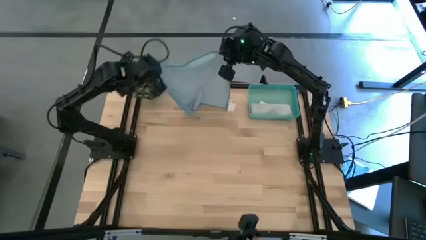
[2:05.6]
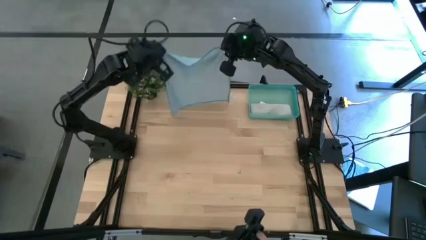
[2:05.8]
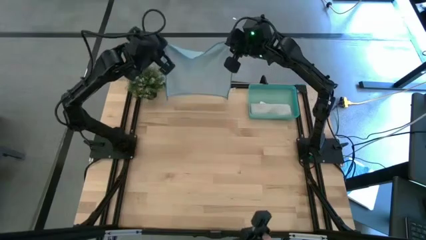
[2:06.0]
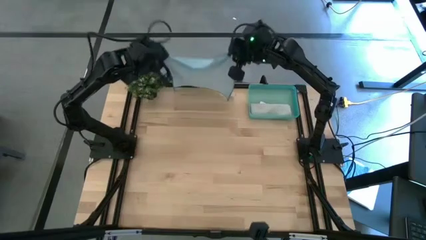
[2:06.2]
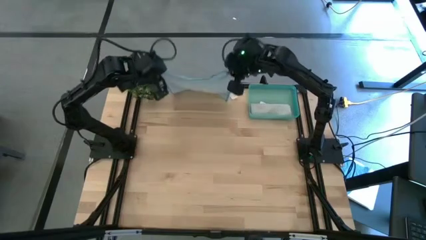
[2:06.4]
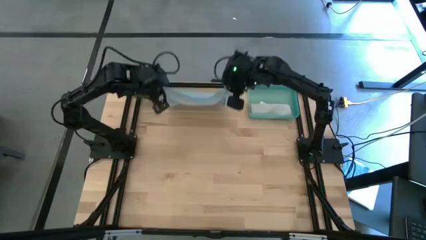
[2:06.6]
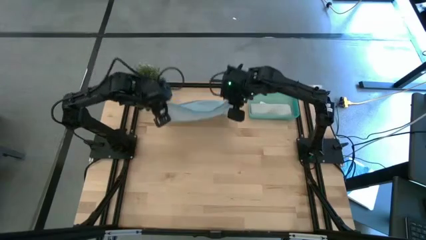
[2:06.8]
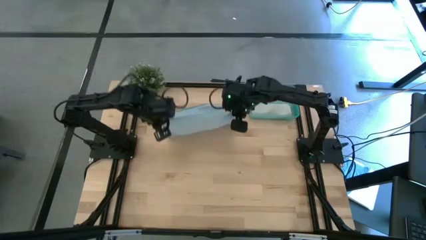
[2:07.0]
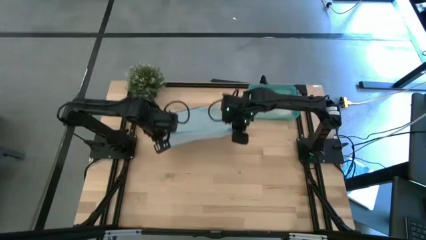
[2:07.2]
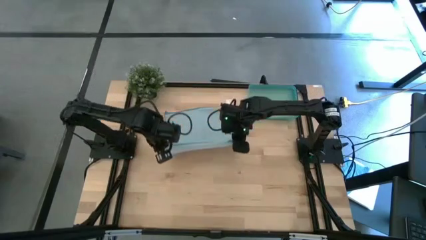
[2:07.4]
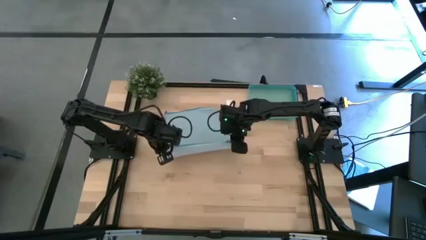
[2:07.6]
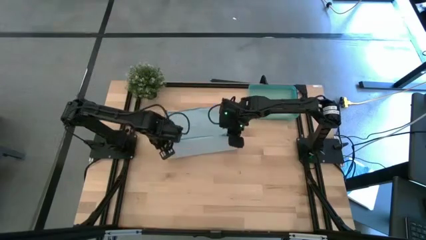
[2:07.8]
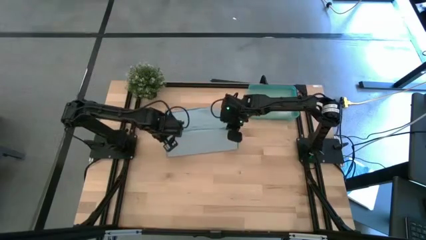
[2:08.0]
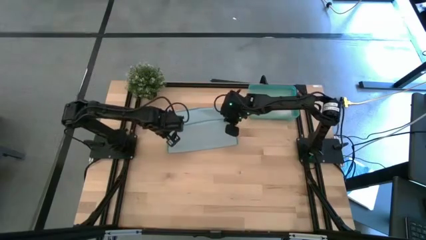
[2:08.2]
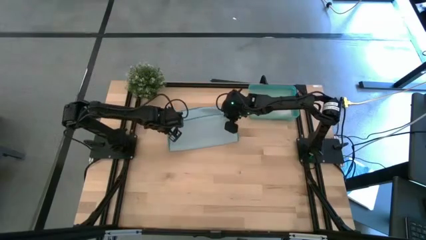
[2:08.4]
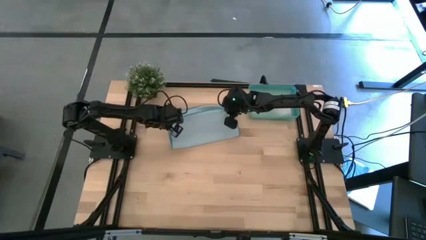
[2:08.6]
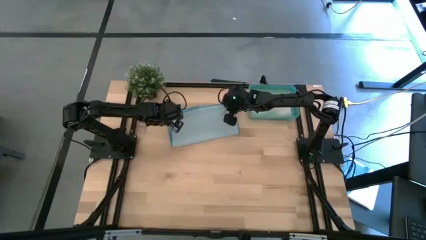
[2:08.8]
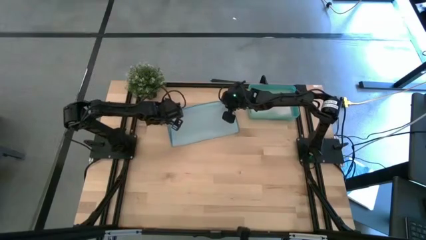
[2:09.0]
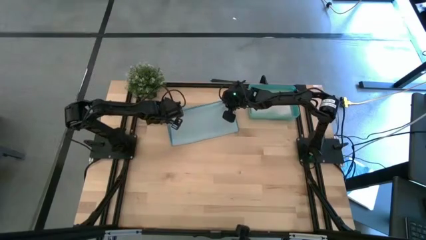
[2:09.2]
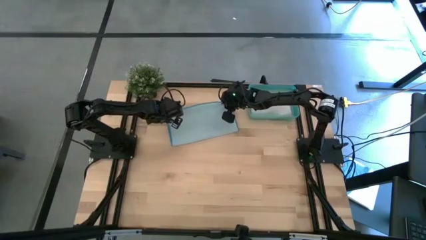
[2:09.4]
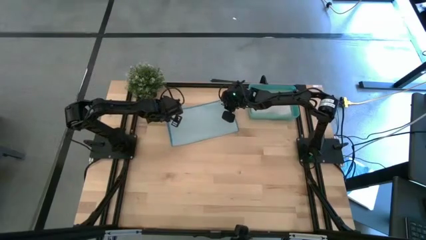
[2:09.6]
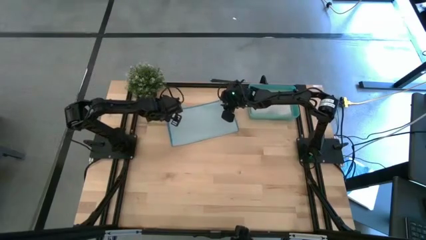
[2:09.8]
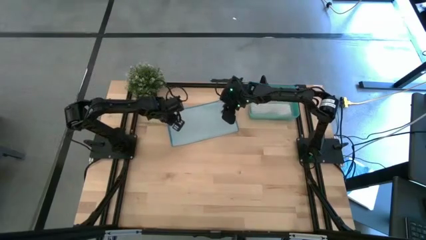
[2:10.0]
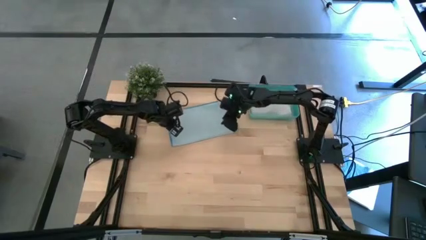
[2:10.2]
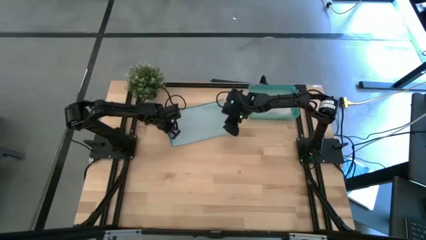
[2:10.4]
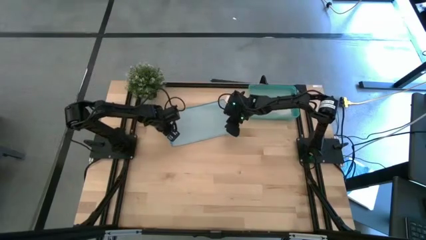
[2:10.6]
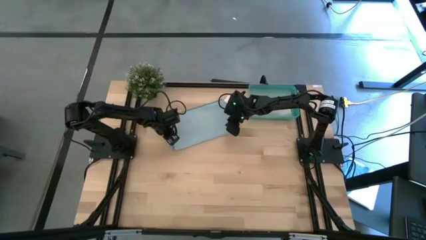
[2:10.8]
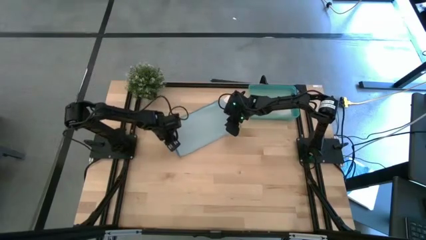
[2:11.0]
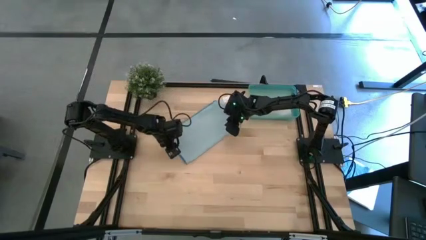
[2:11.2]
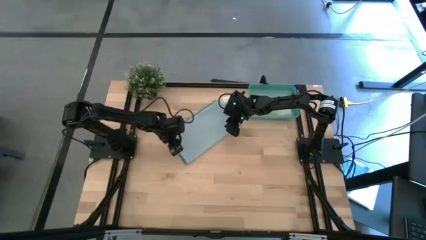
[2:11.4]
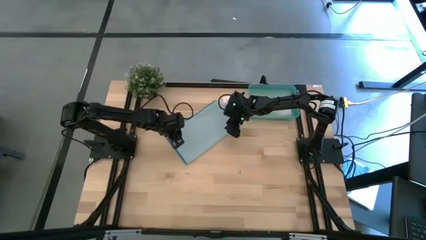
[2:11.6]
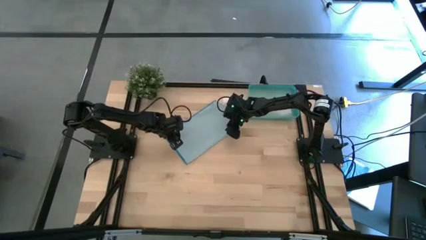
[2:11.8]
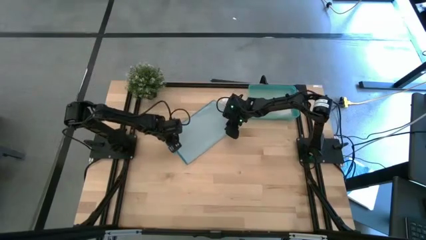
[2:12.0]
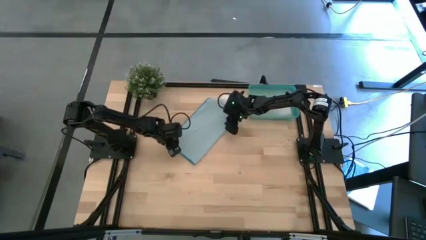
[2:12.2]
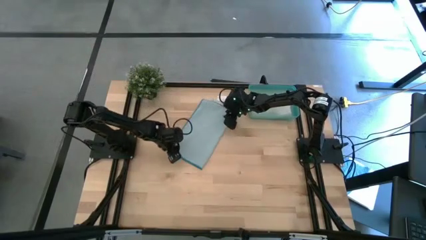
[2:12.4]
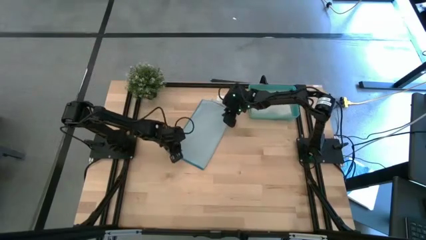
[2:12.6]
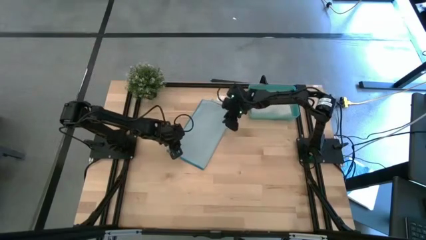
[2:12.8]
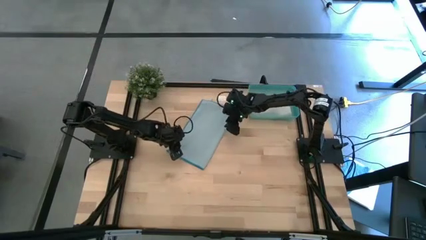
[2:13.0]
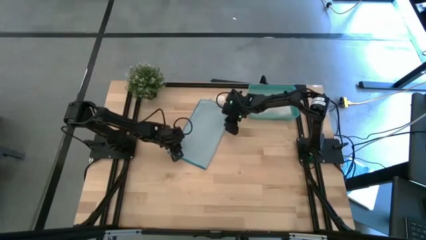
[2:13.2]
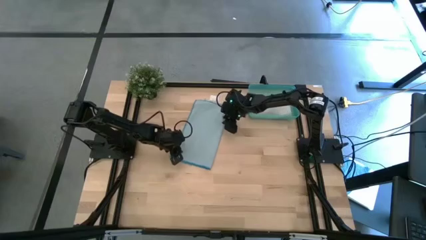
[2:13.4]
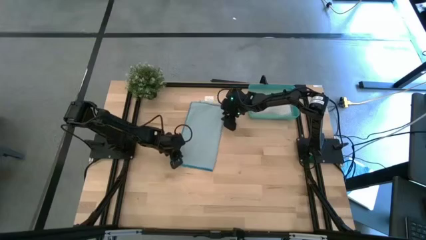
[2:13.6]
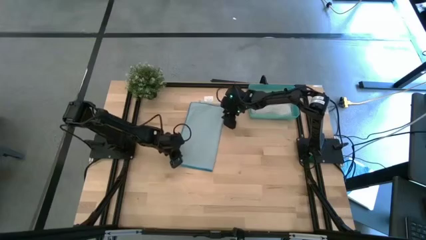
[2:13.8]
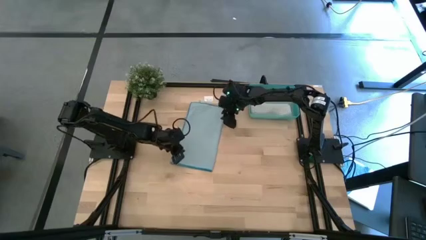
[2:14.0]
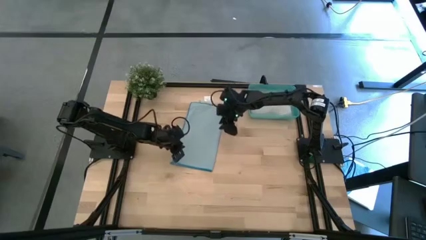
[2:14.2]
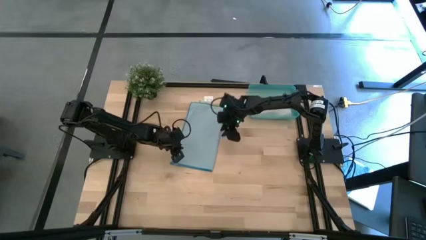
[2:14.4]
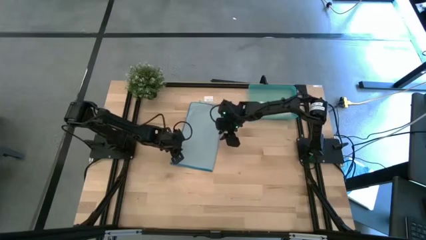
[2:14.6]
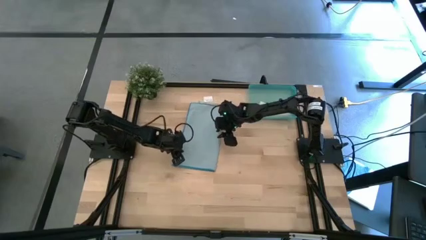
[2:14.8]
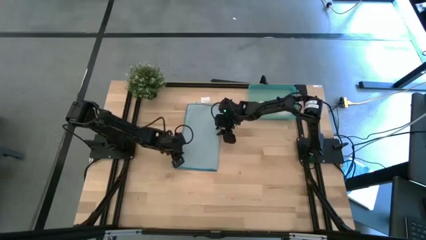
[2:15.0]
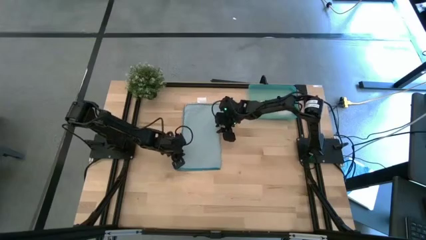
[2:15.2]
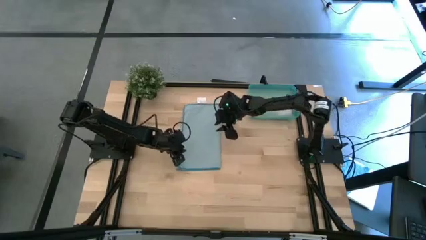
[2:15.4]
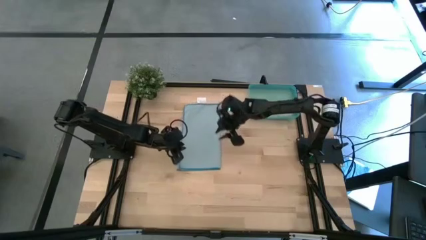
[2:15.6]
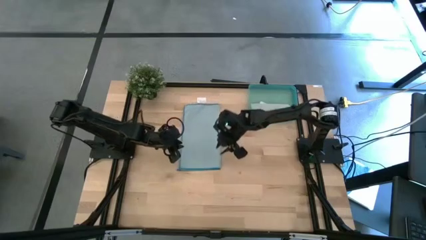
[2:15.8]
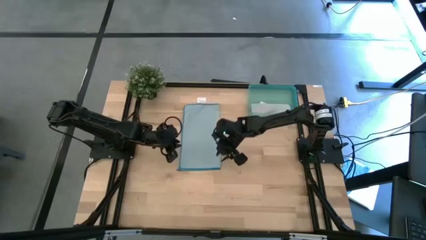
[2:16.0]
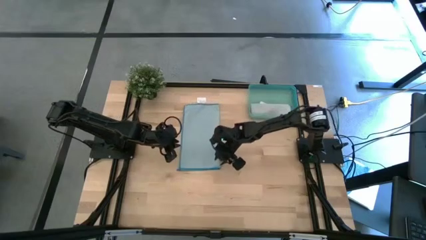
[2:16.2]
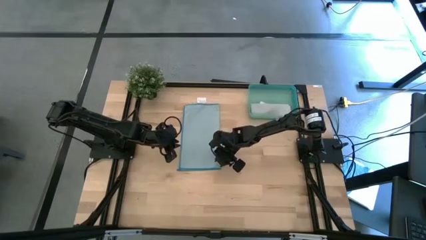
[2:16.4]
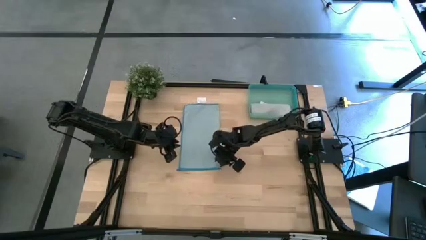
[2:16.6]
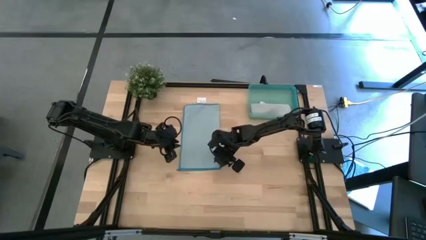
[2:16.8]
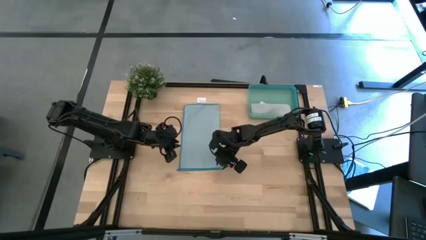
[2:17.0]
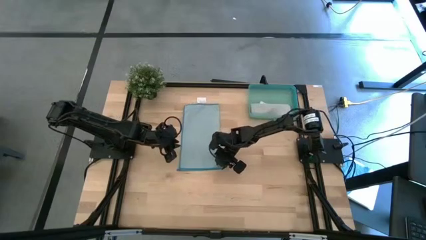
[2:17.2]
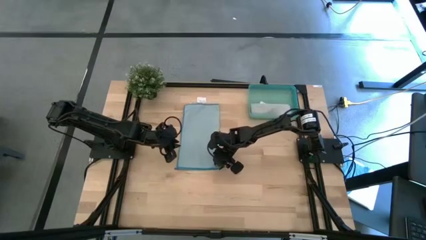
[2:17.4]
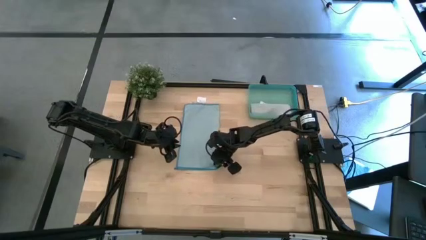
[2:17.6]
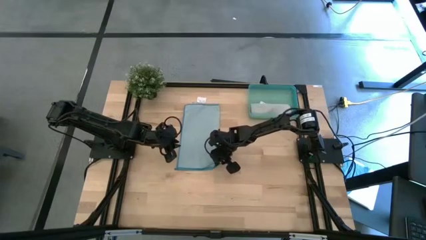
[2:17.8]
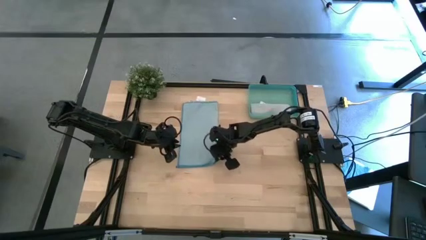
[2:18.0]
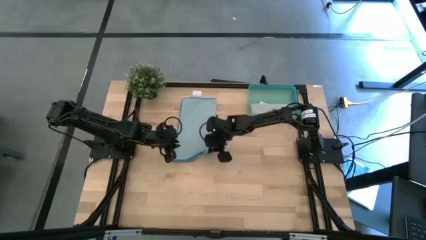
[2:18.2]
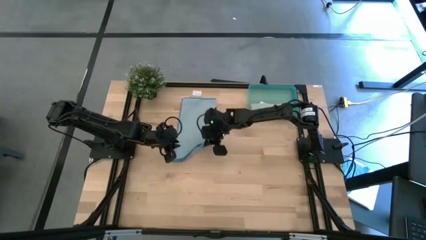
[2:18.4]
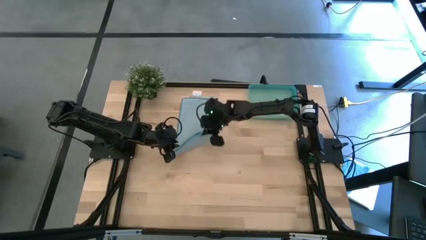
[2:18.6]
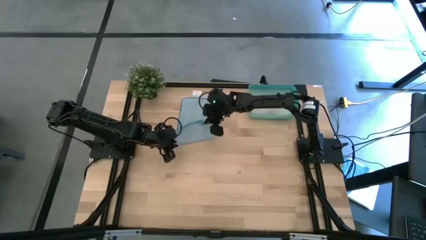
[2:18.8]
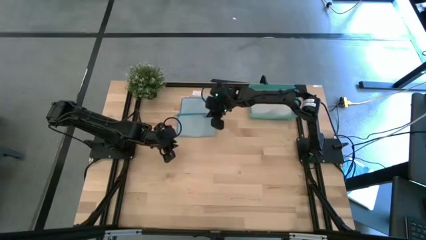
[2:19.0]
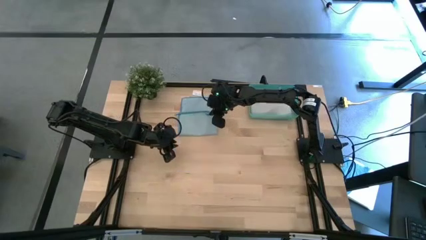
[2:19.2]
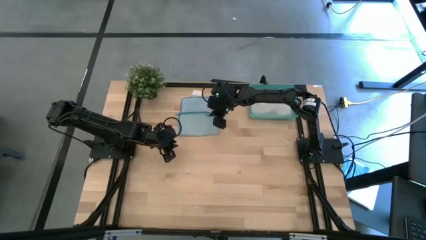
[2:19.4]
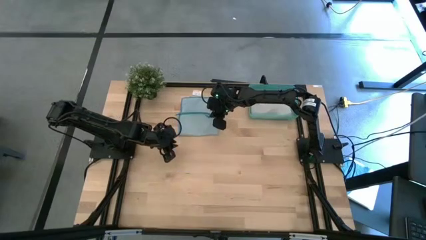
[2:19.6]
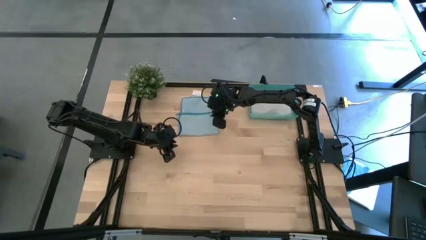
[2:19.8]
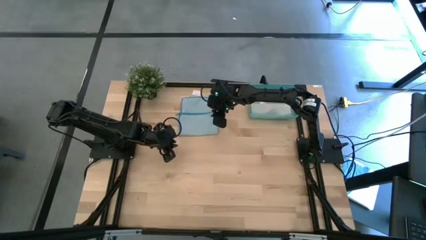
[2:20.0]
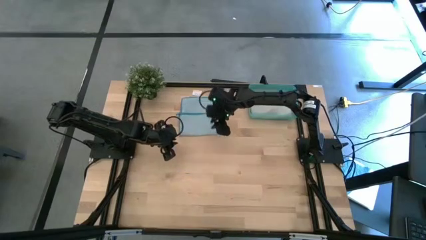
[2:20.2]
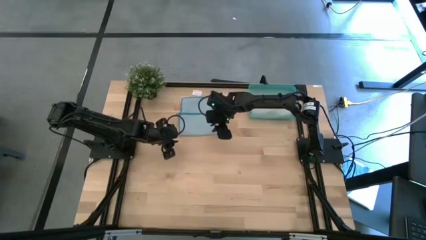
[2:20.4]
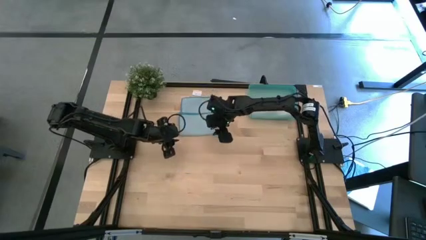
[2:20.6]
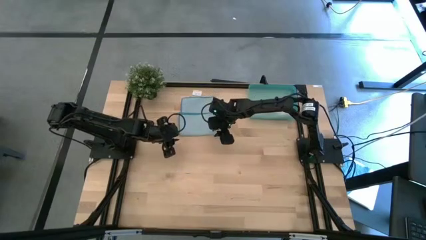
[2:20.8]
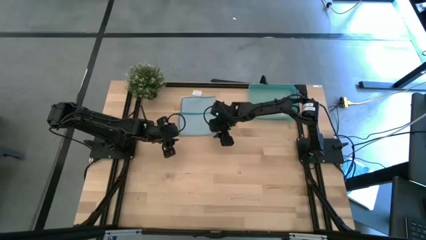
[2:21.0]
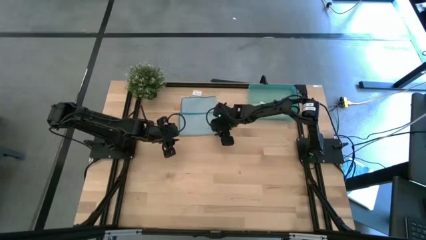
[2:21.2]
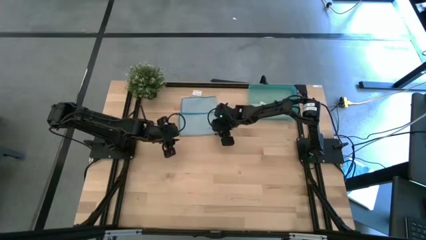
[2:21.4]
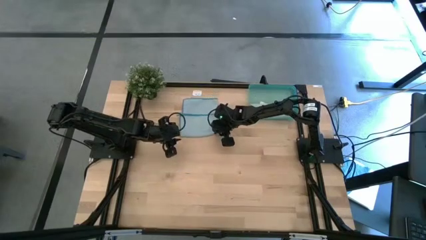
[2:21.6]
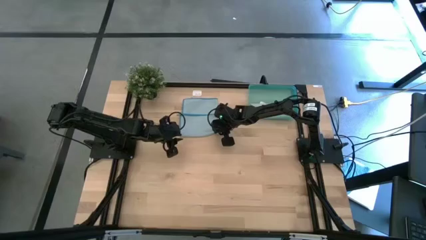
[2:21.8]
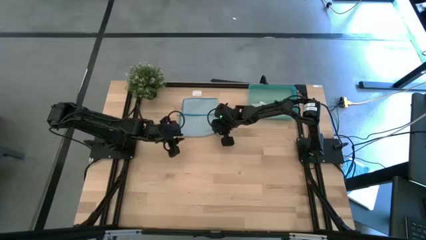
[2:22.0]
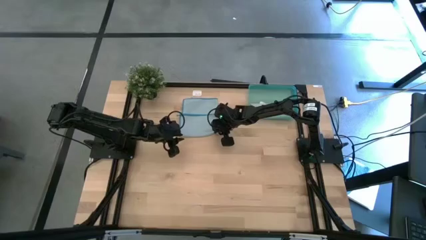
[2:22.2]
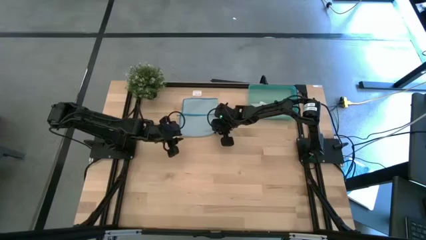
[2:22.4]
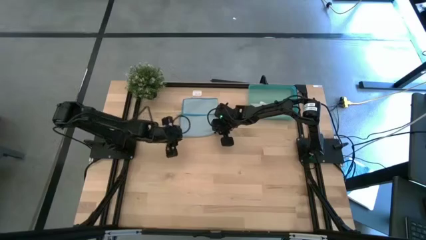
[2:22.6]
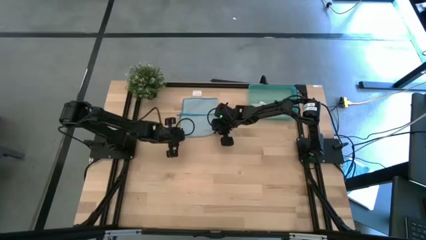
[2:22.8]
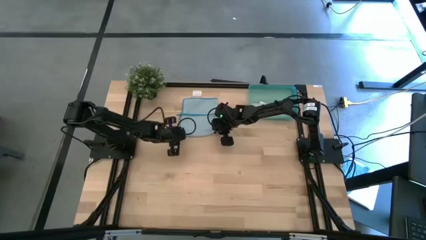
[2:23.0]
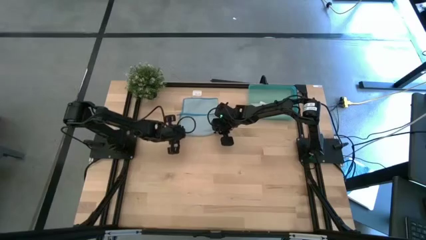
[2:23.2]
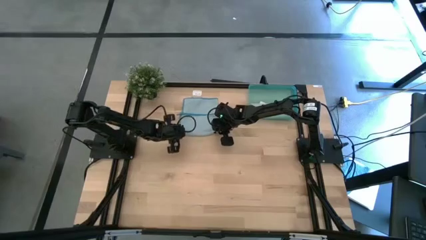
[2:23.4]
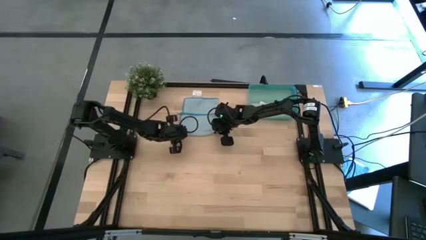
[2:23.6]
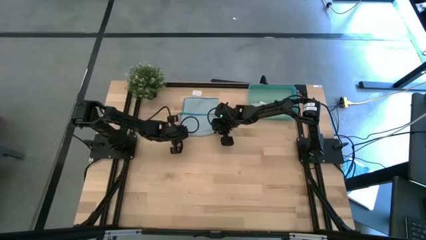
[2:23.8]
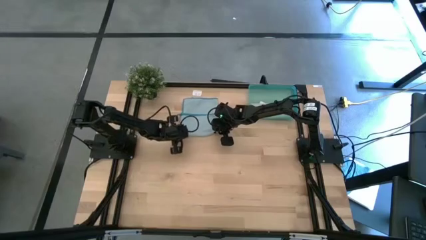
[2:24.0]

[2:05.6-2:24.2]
Task: Roll microfiber towels into tight, uniform cylinder then place into a basket
Roll the blue microfiber towel
